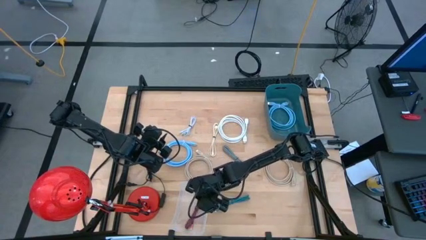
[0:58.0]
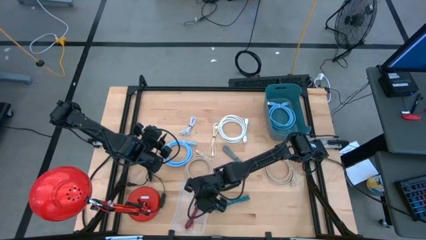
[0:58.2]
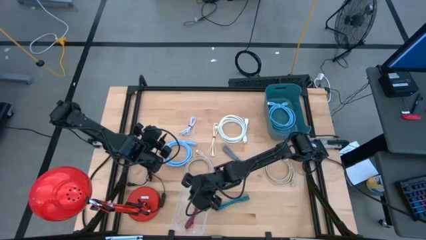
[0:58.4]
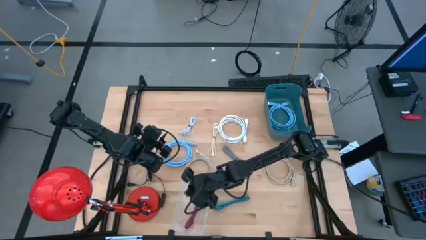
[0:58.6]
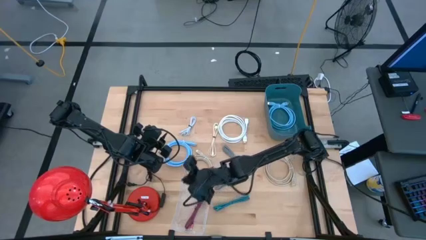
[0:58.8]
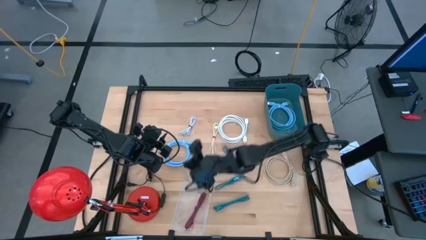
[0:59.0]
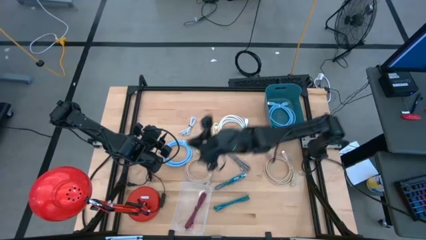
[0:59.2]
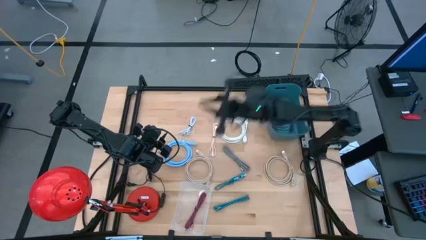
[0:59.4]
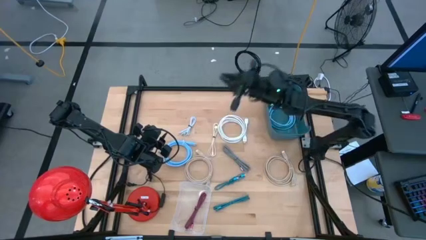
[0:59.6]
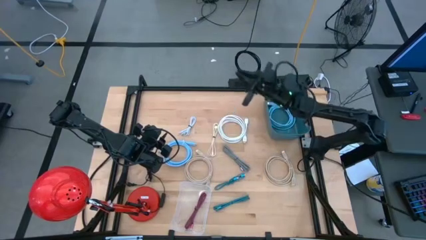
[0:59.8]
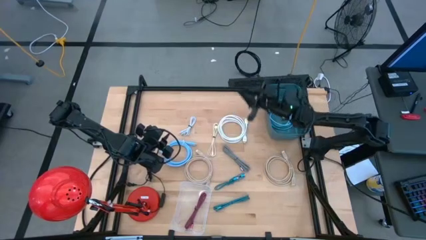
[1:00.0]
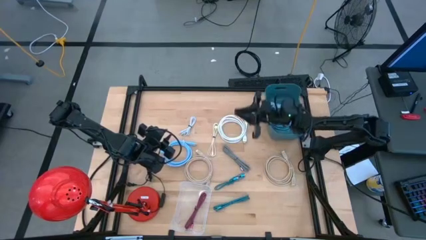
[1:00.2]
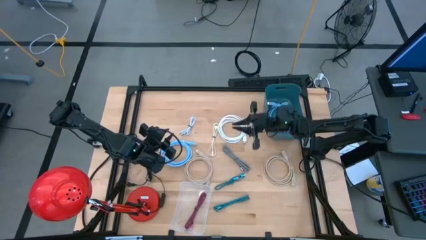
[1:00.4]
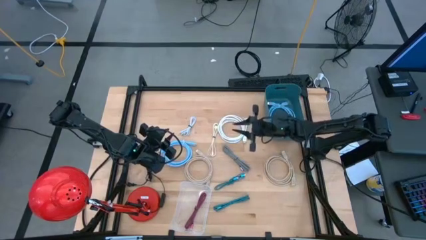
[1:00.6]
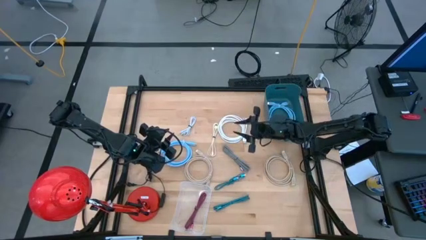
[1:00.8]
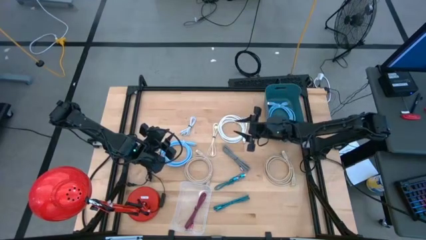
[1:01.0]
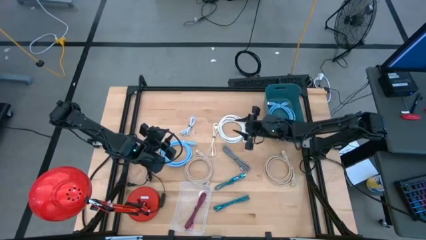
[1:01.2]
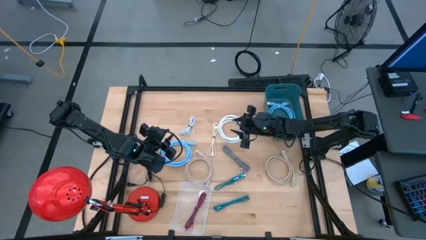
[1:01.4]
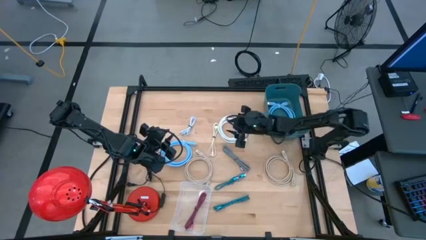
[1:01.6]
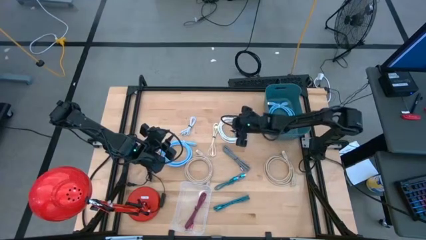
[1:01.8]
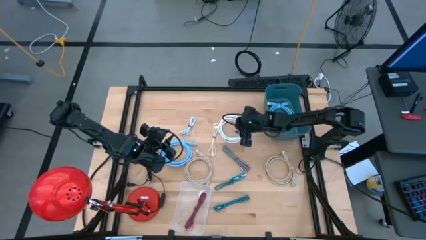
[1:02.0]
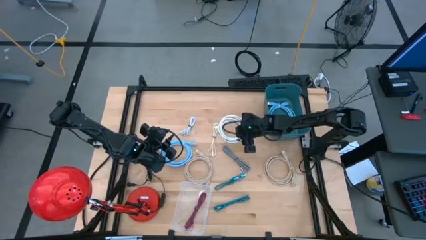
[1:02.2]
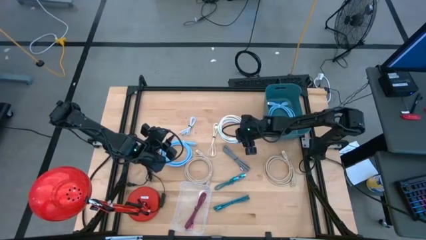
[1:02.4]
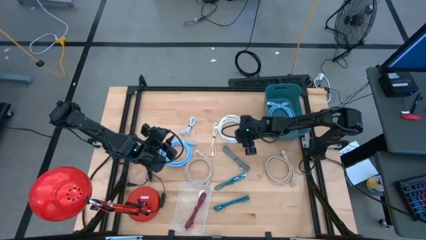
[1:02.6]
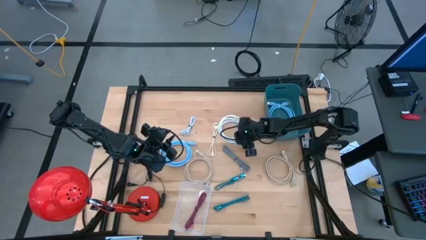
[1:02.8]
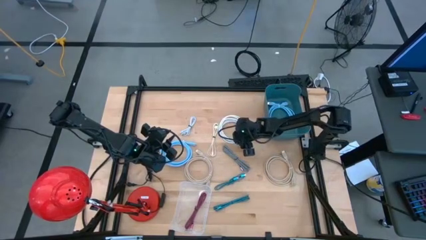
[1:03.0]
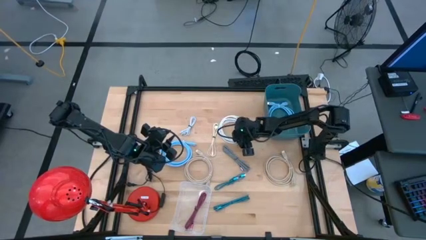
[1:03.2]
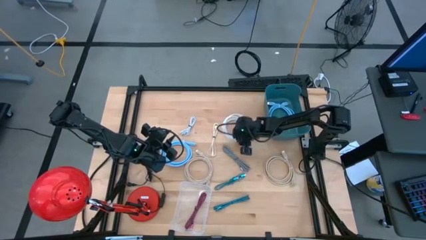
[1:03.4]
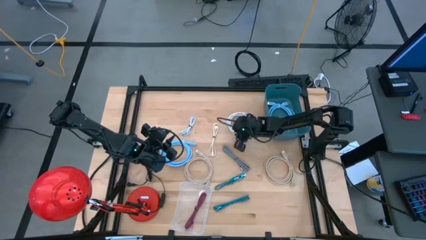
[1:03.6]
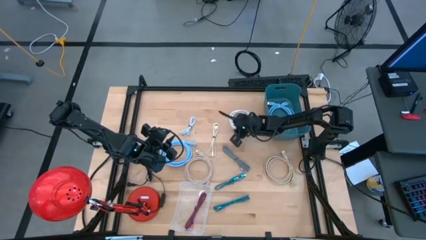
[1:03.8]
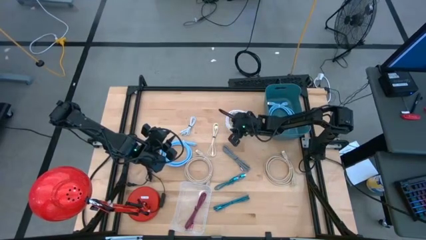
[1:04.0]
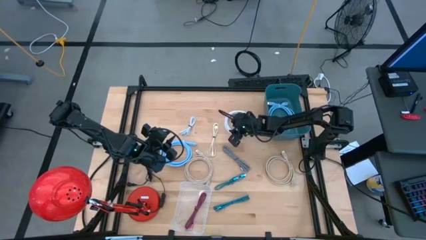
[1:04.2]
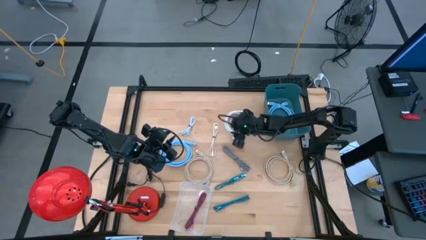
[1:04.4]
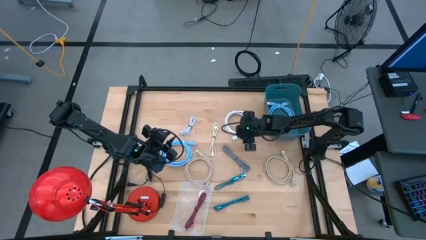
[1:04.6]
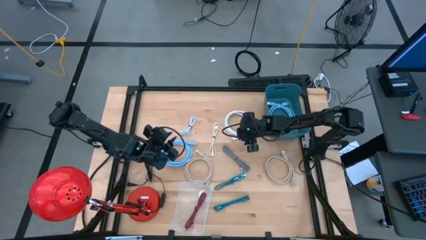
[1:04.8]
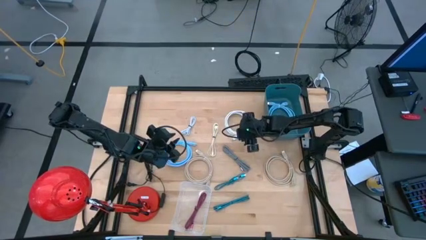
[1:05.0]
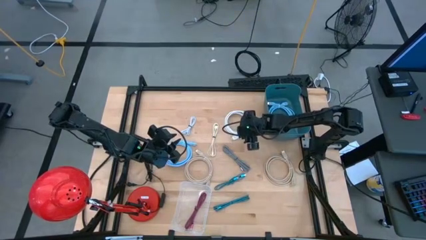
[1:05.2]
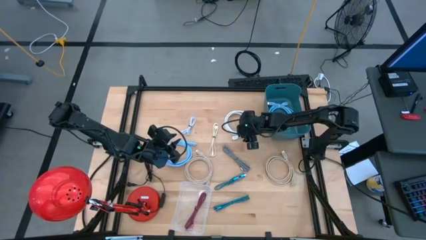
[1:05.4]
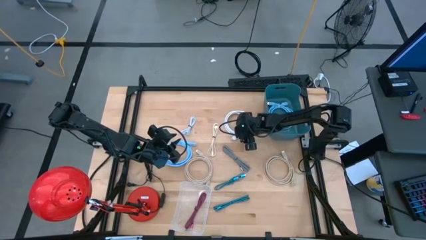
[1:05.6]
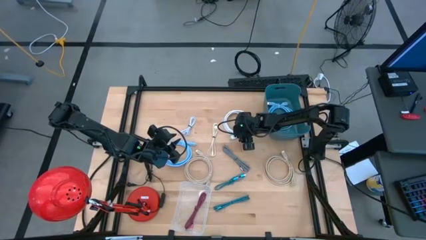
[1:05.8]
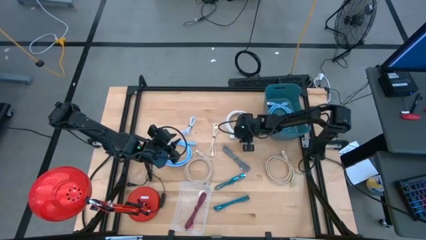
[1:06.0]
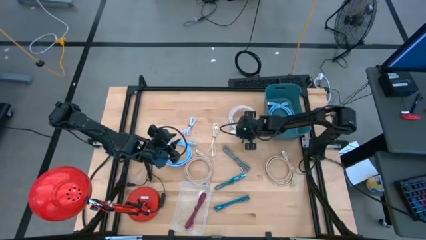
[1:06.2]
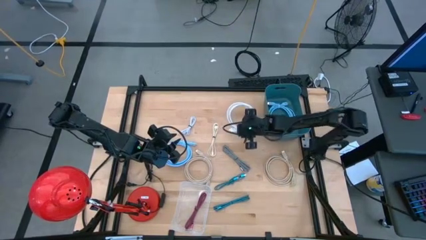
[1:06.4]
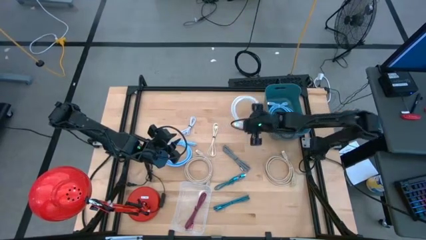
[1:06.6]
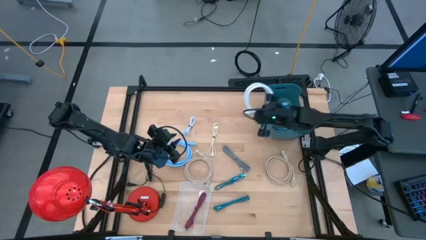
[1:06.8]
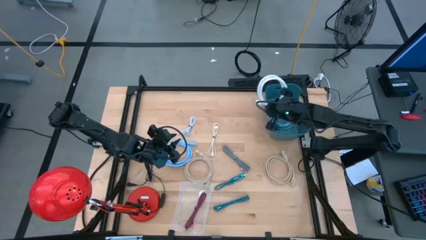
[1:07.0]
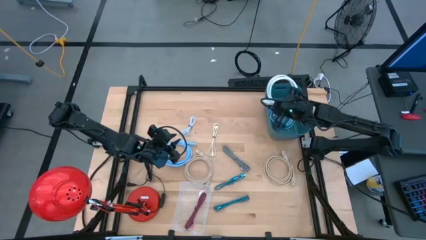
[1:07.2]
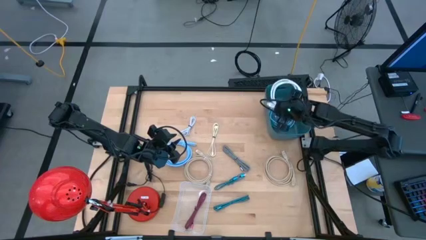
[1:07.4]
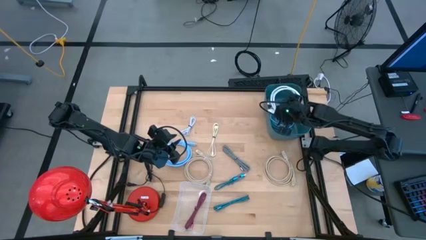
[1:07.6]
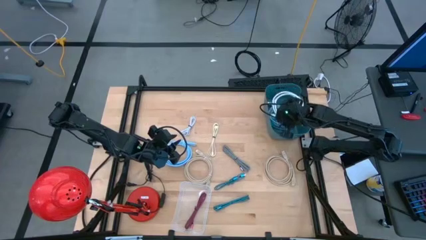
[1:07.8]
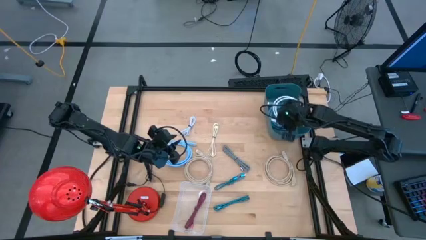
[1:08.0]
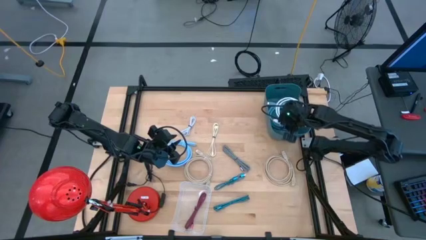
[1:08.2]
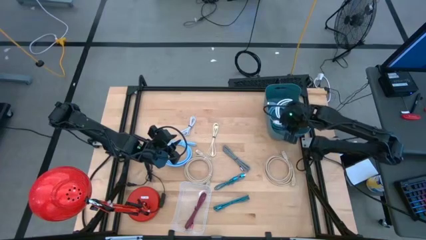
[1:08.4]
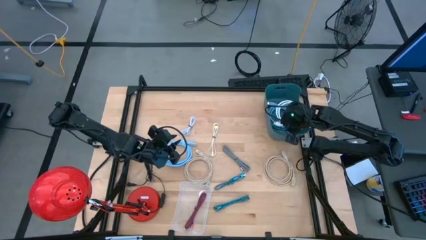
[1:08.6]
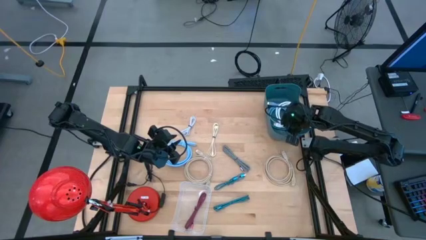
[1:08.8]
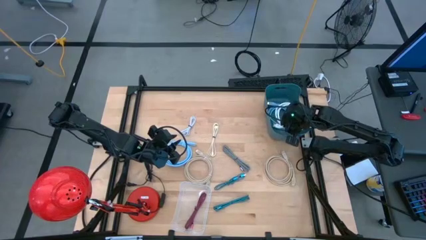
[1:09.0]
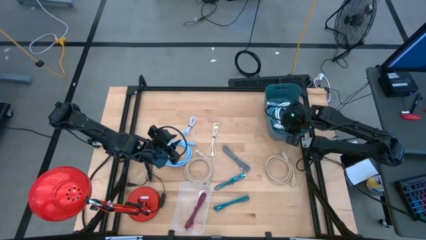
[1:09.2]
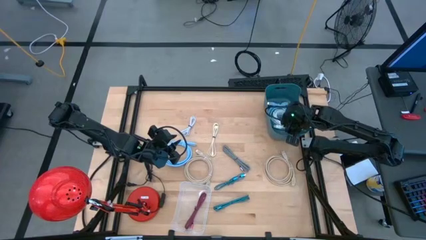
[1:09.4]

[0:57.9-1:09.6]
Task: Pick & Place USB Port
Put the white usb cable into the blue bin
